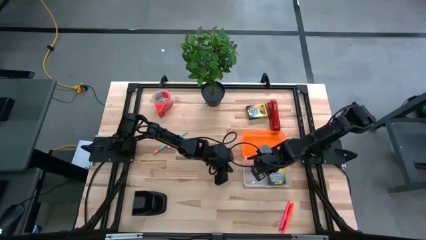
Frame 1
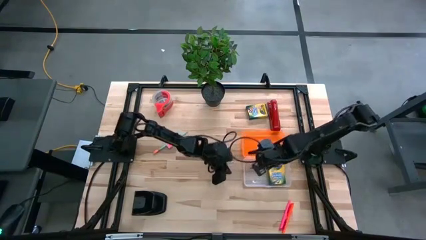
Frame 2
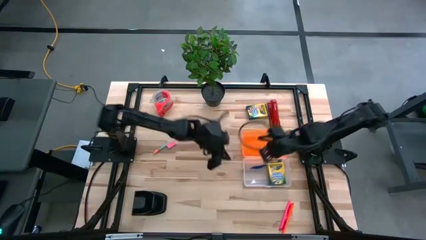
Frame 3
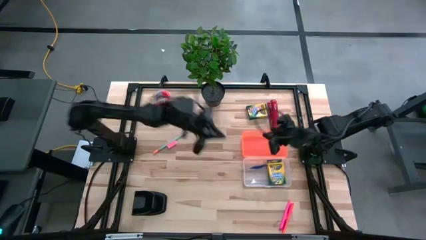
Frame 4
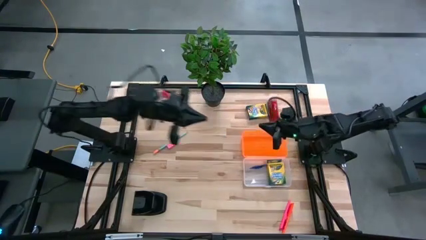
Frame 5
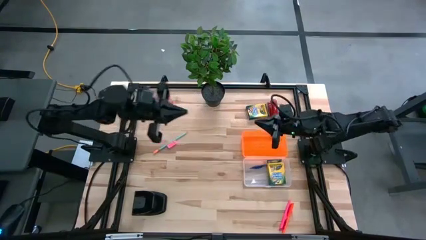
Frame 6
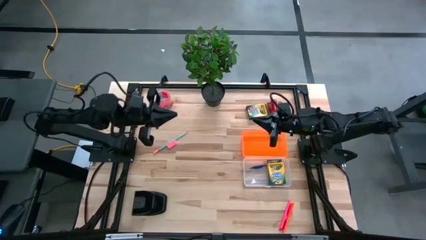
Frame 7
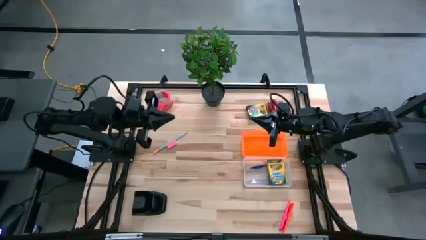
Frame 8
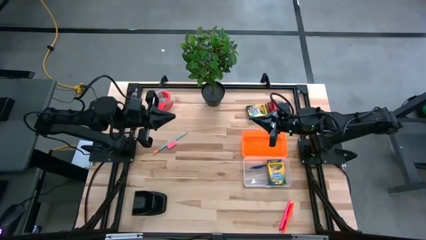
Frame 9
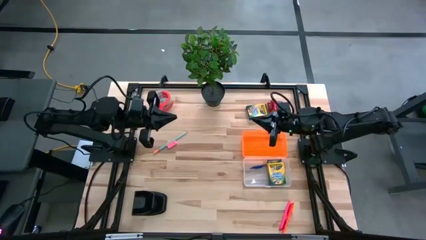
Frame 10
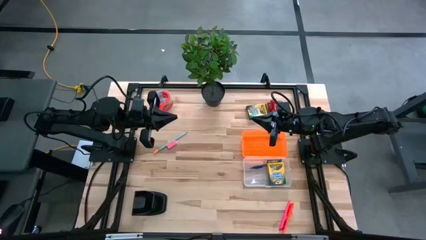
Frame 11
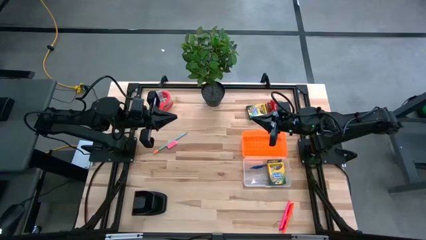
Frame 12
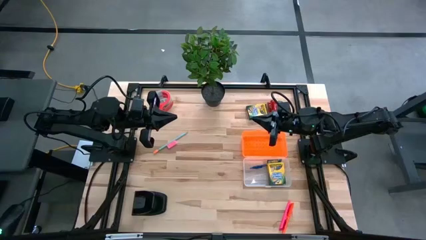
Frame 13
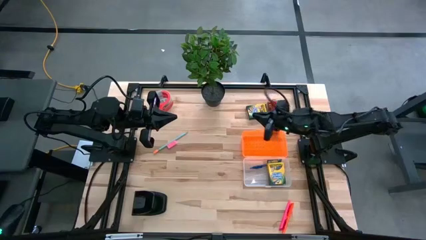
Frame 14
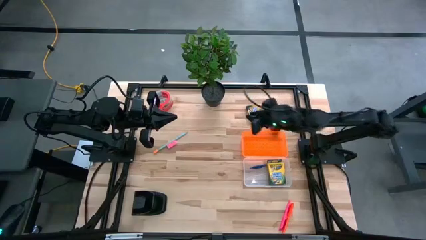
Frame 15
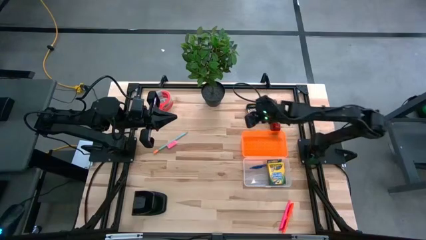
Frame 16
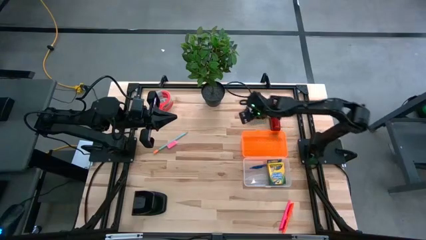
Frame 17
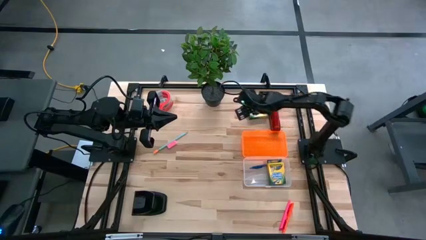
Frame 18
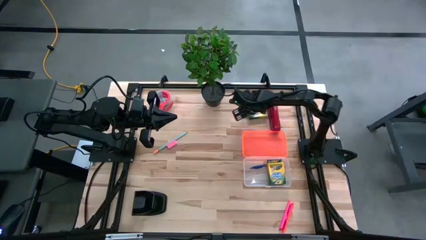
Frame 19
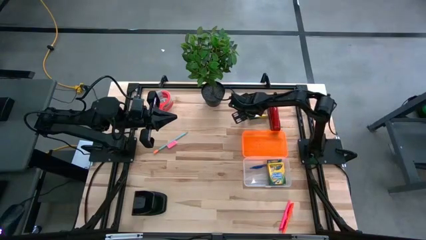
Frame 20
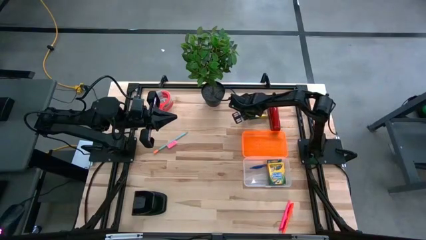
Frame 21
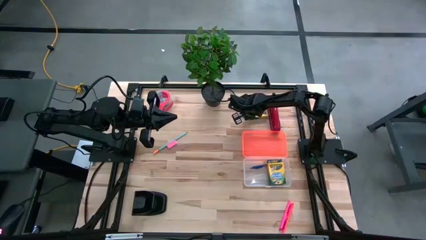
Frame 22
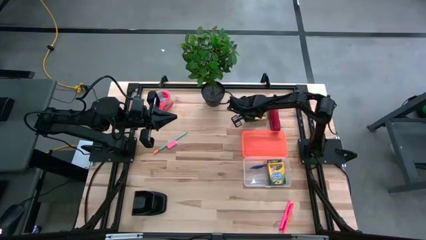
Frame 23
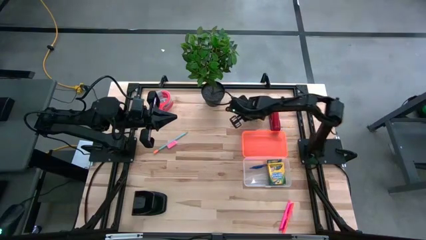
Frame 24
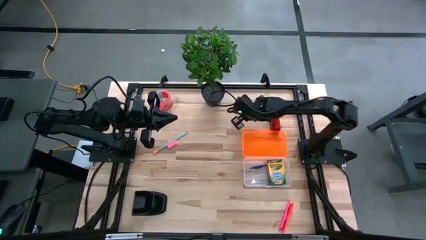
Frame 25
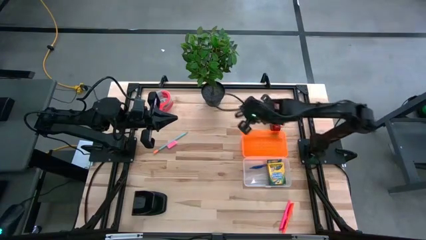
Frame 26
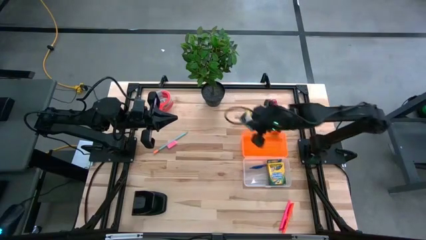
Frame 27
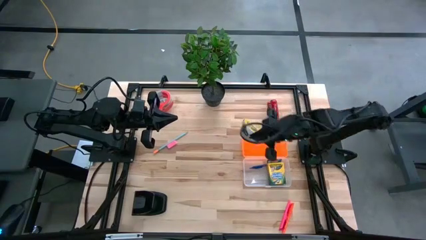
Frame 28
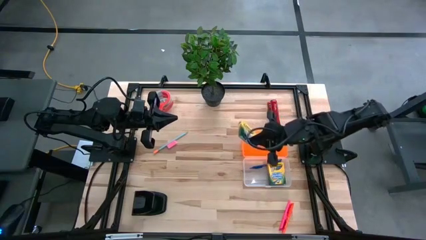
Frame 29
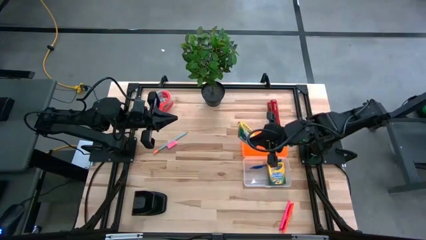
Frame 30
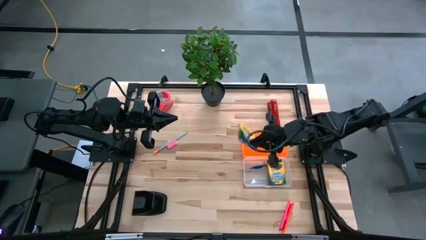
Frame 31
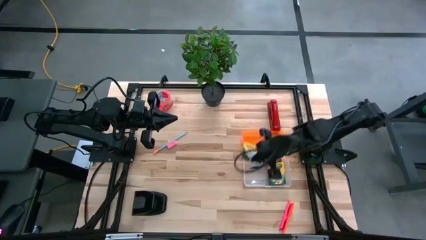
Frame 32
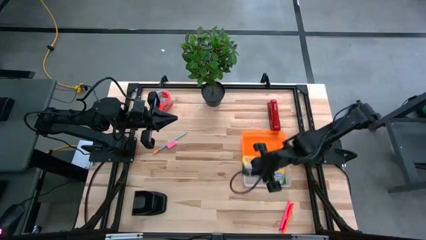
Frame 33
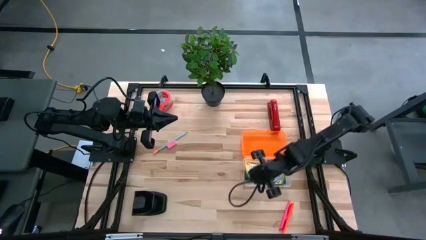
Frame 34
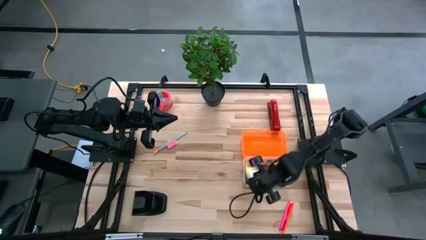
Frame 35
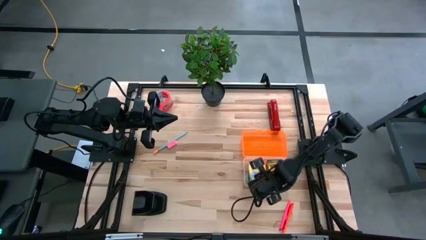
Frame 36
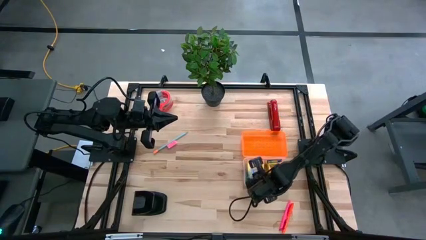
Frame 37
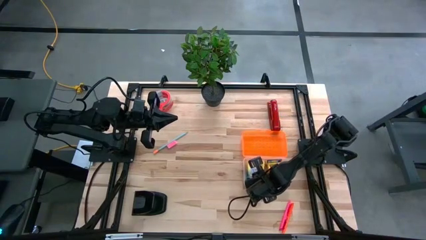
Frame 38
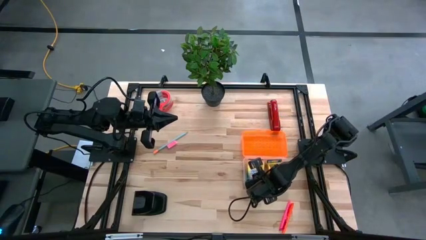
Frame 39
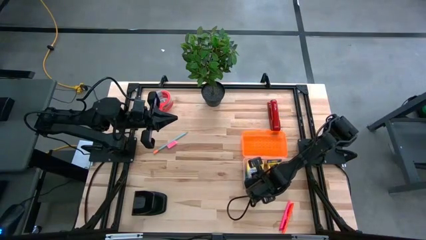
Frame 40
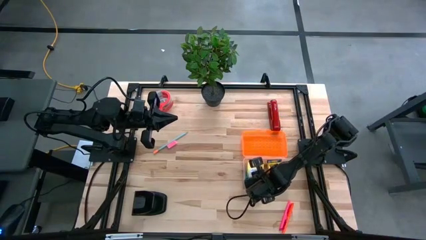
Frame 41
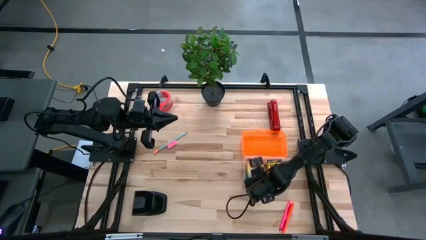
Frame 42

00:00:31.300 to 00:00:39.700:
Task: Pack school essentials
Put the orange crayon box into the orange supply box

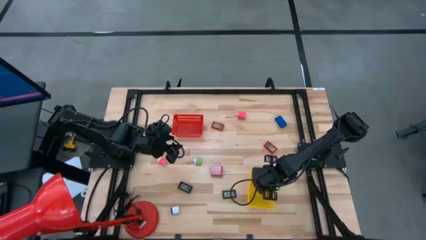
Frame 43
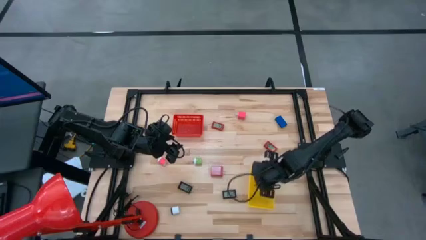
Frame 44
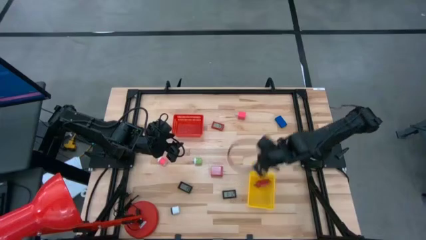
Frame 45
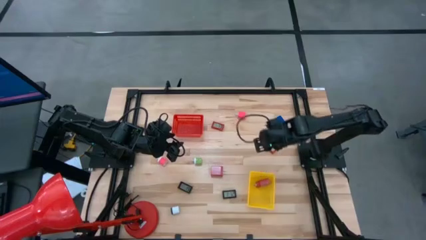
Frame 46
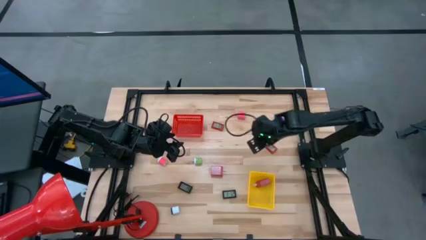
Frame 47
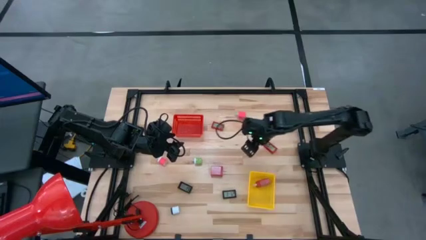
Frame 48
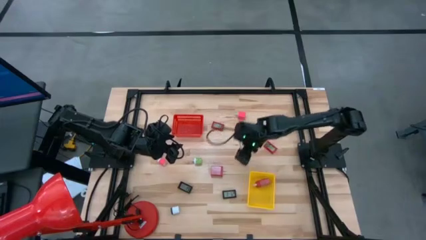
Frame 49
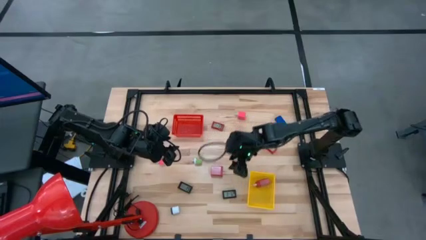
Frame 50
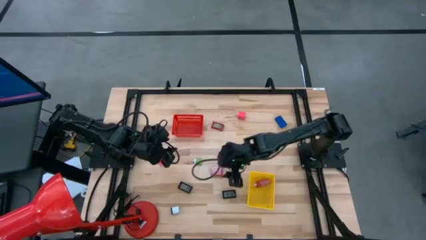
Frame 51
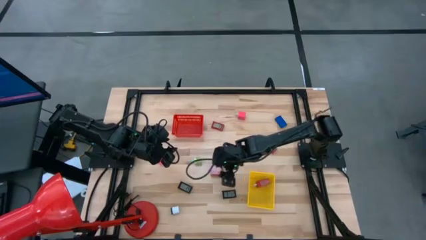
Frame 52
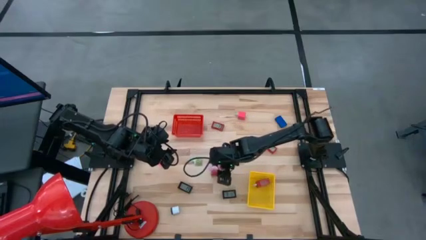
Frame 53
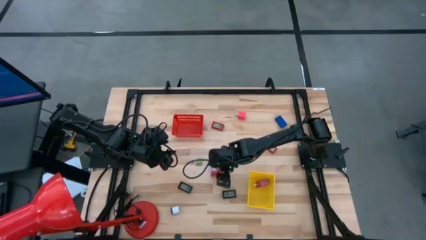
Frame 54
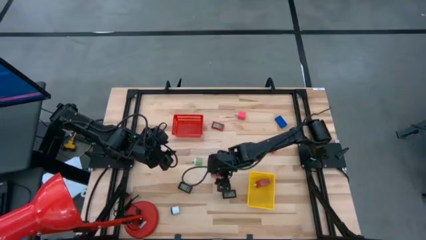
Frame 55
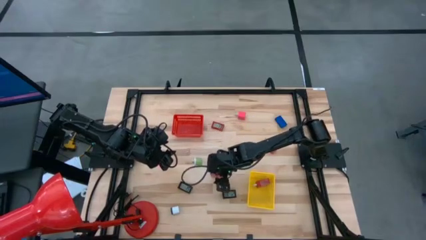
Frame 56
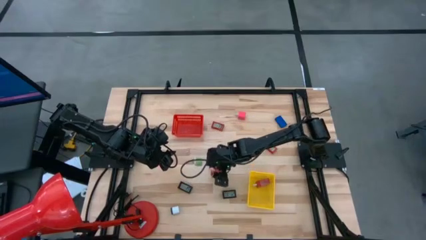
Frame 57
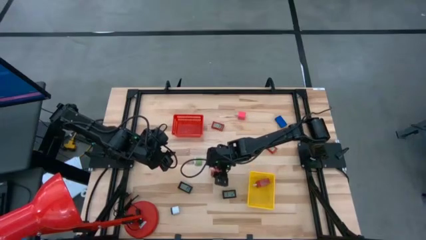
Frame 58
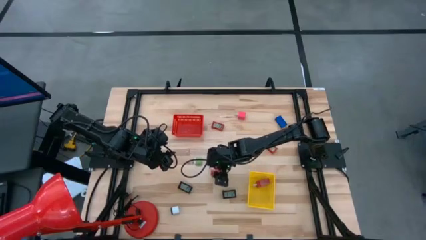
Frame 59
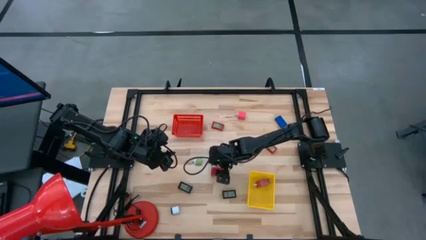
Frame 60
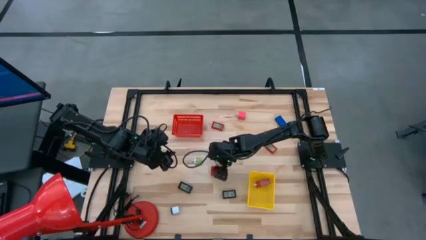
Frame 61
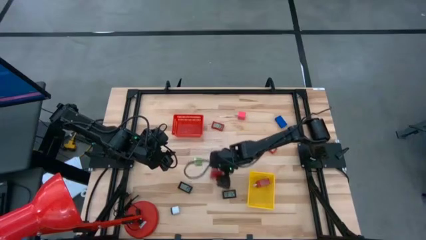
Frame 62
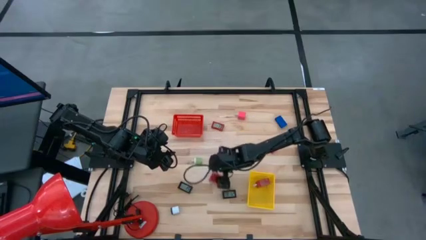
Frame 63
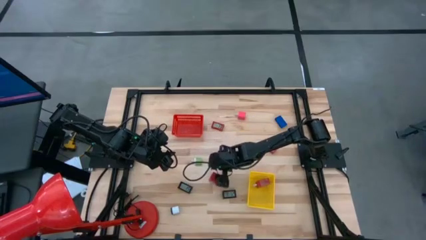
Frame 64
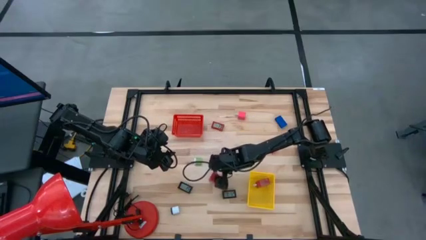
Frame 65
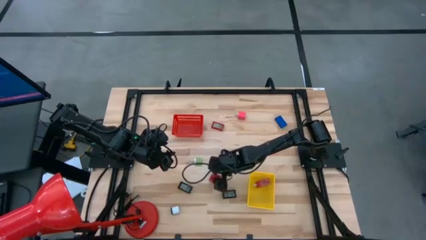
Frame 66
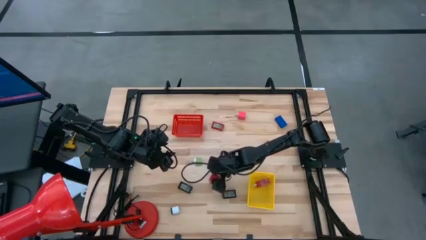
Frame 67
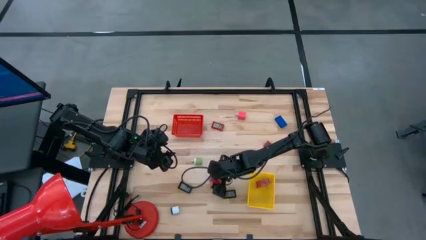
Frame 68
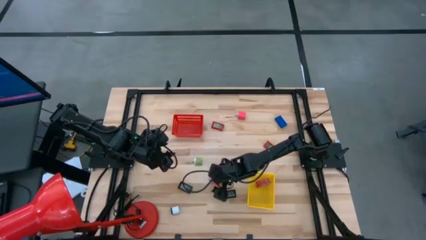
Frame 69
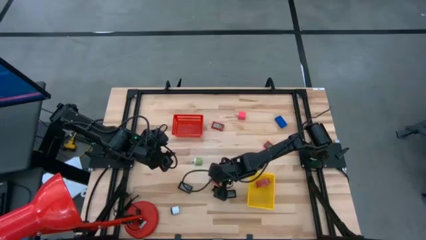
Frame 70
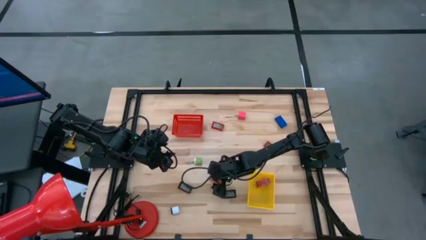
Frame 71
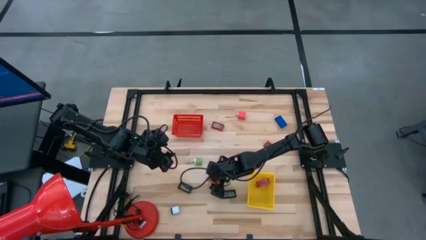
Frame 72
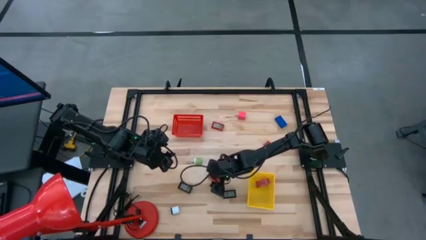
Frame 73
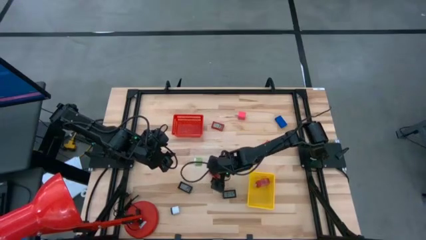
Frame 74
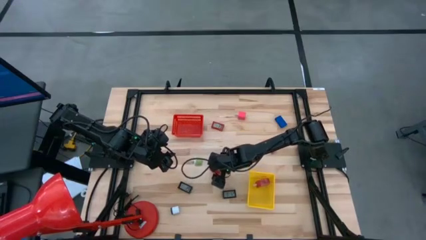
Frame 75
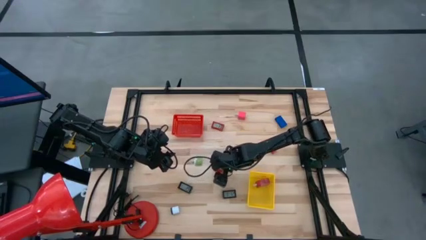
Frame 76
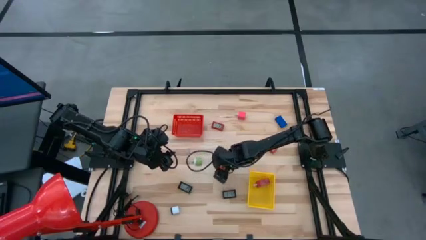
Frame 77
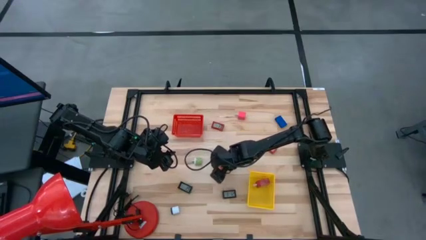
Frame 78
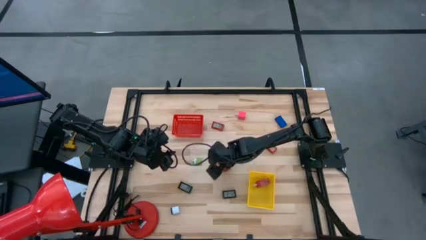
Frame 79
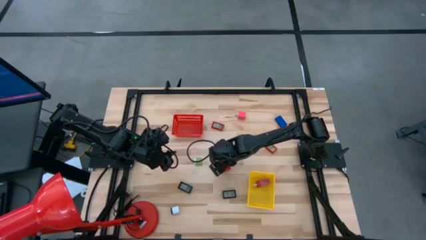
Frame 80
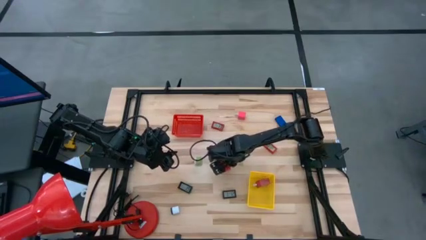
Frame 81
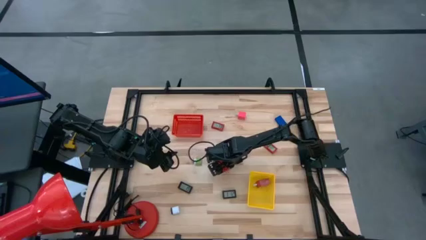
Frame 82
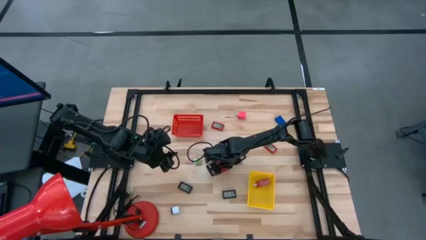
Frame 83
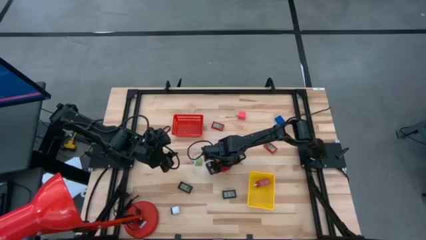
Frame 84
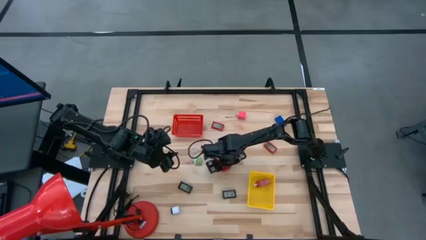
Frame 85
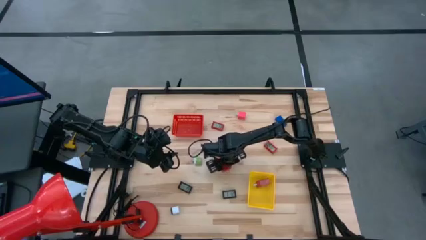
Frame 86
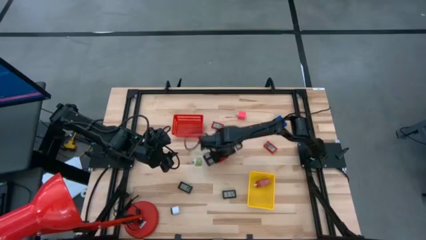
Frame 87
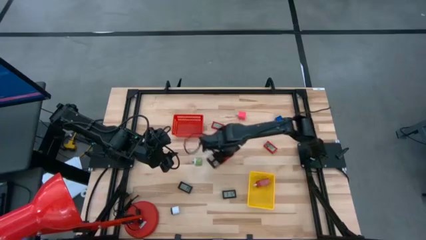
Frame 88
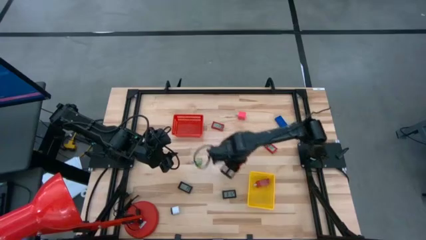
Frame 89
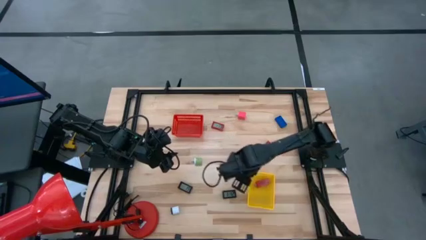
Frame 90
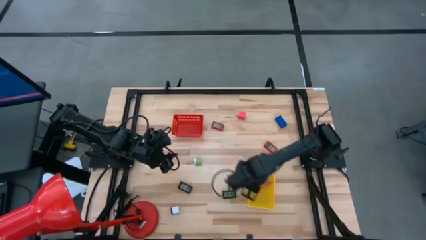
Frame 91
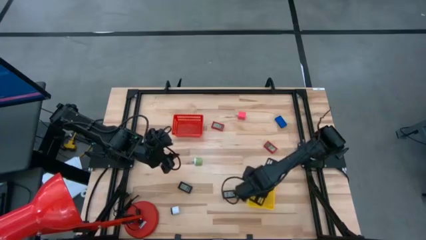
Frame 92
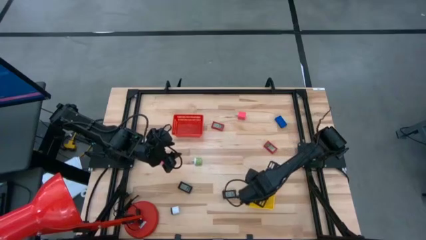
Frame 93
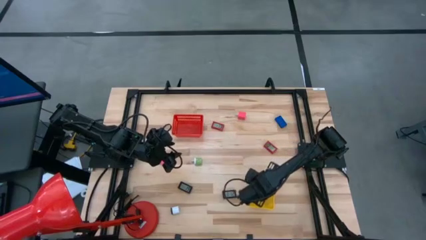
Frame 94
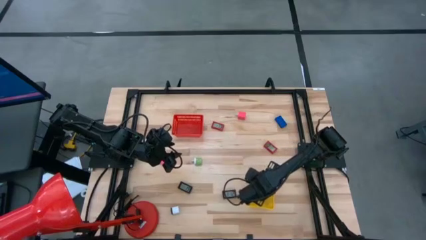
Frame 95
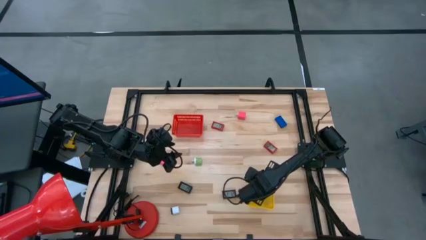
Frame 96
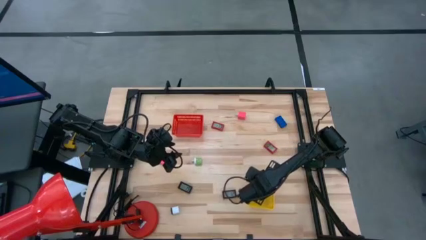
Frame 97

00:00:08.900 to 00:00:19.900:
Task: Pick & Place Office items
Put the red charger adapter into the yellow basket
